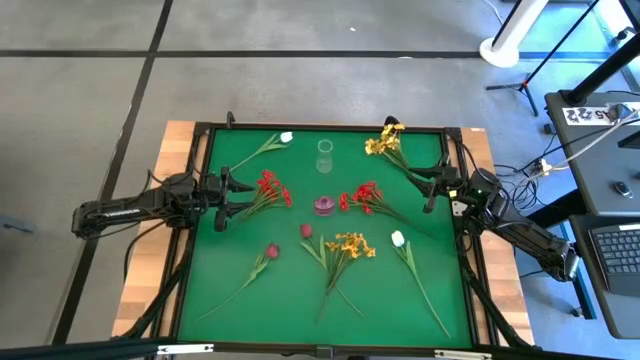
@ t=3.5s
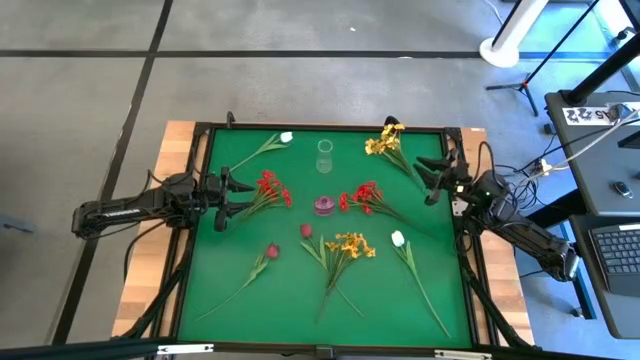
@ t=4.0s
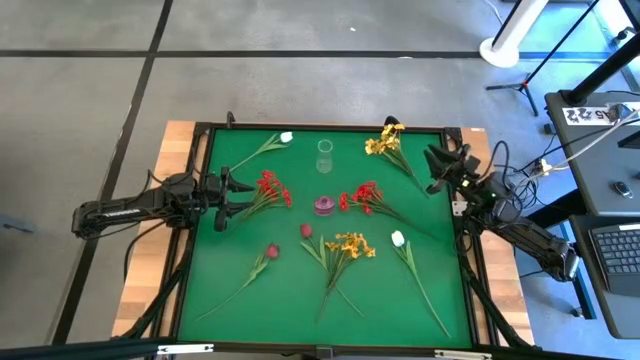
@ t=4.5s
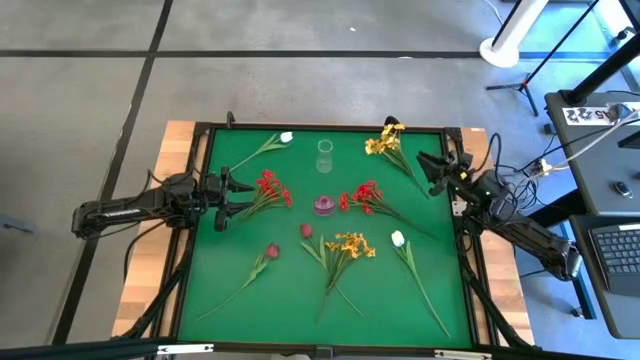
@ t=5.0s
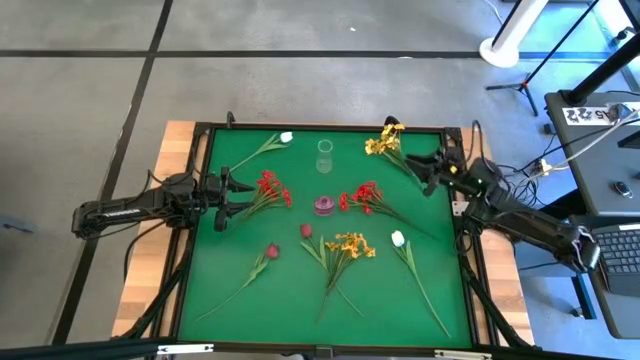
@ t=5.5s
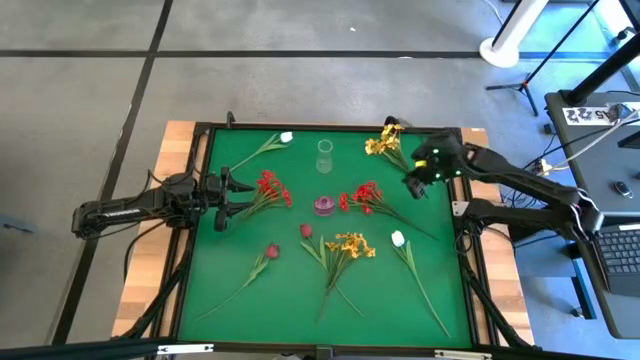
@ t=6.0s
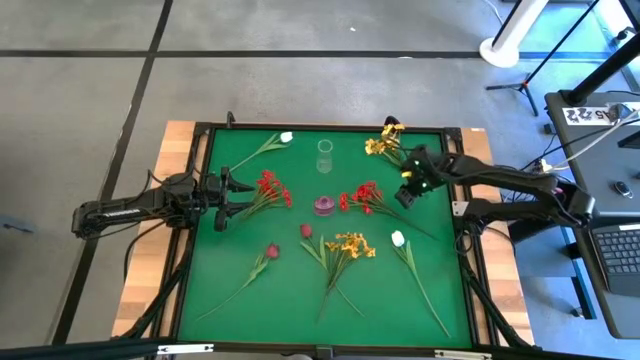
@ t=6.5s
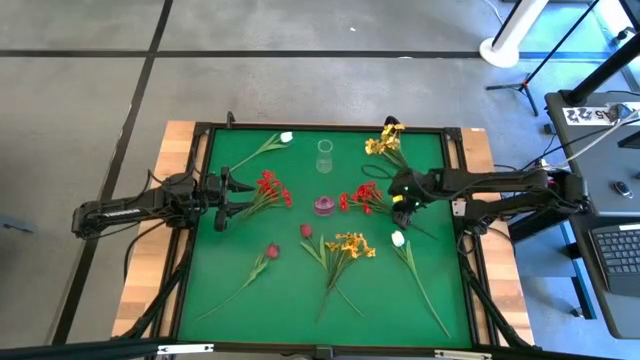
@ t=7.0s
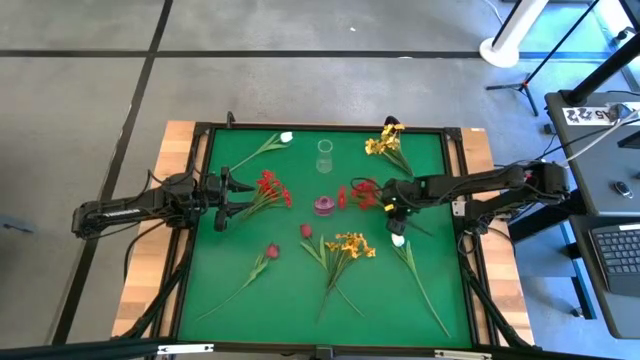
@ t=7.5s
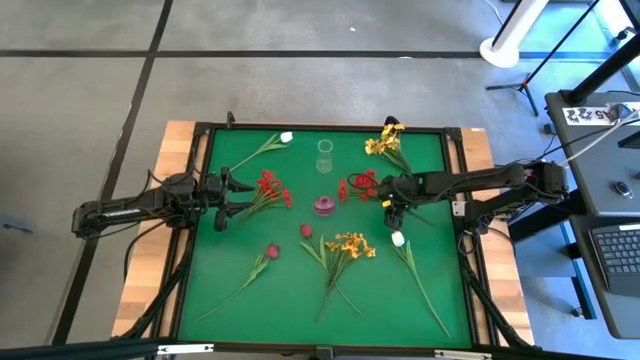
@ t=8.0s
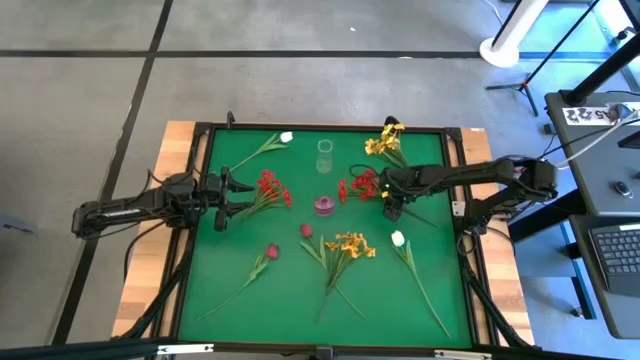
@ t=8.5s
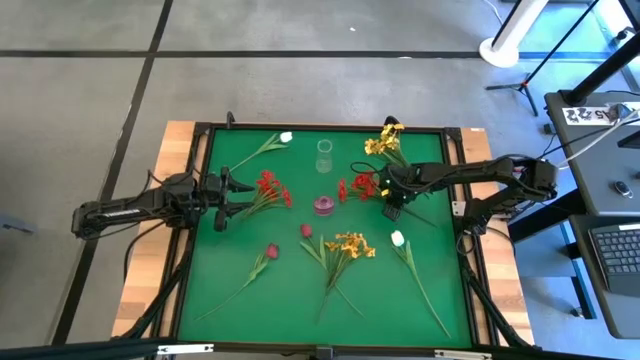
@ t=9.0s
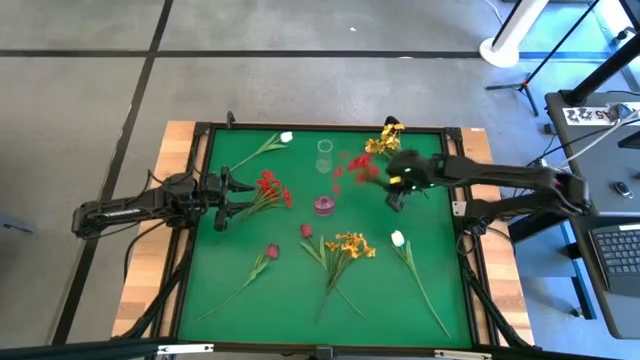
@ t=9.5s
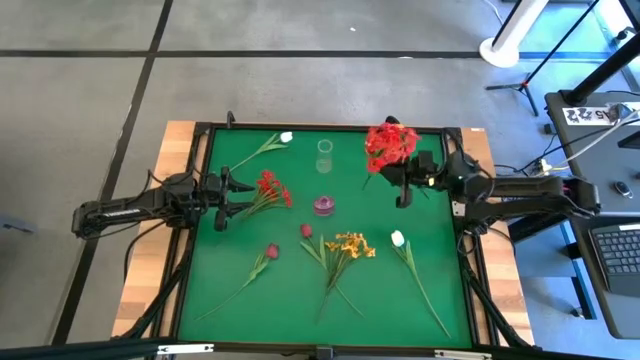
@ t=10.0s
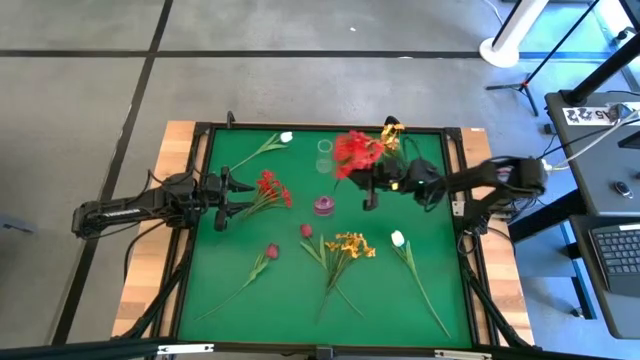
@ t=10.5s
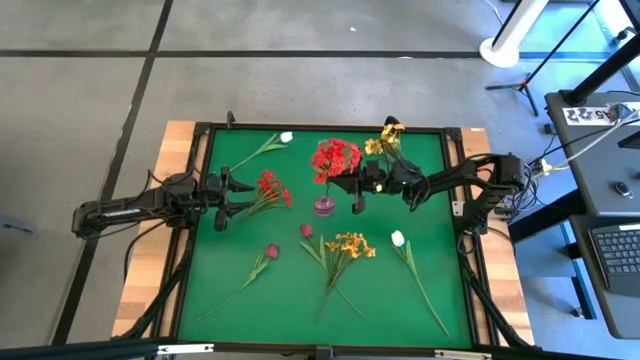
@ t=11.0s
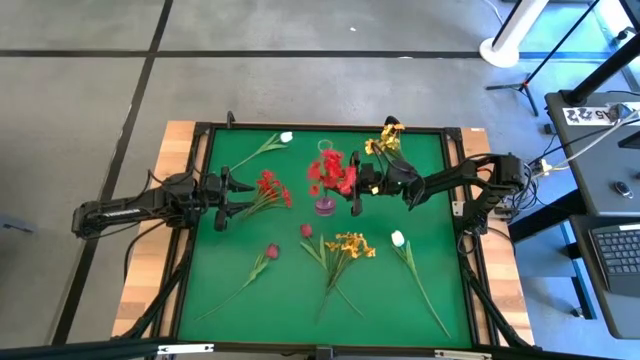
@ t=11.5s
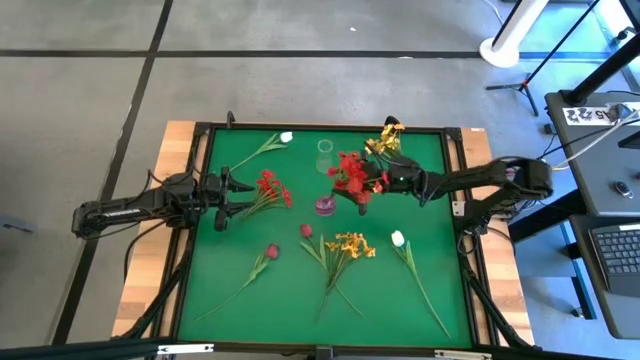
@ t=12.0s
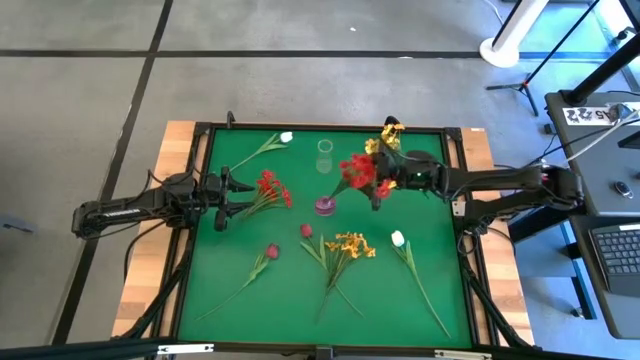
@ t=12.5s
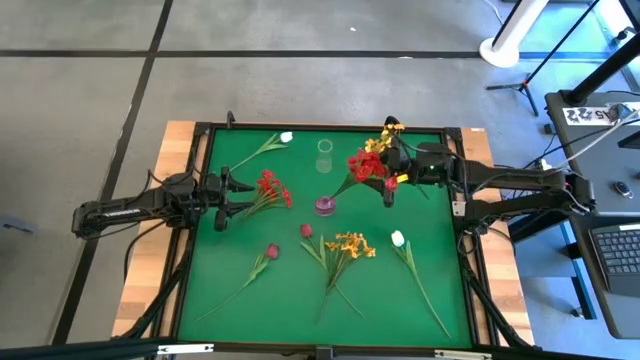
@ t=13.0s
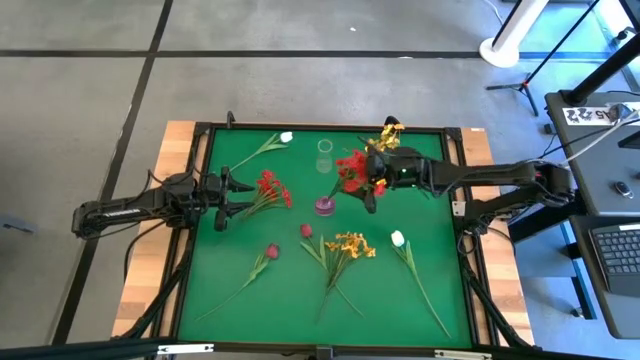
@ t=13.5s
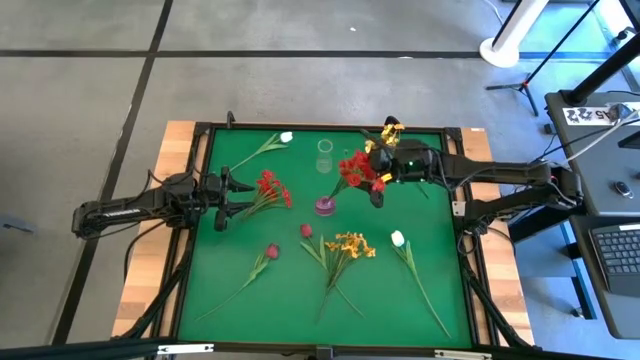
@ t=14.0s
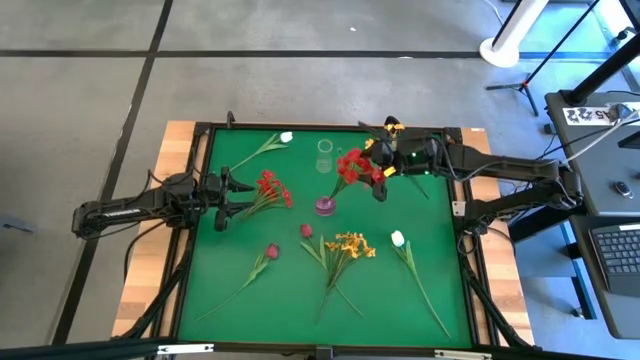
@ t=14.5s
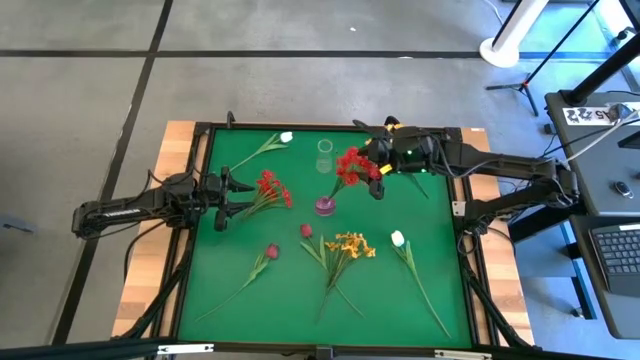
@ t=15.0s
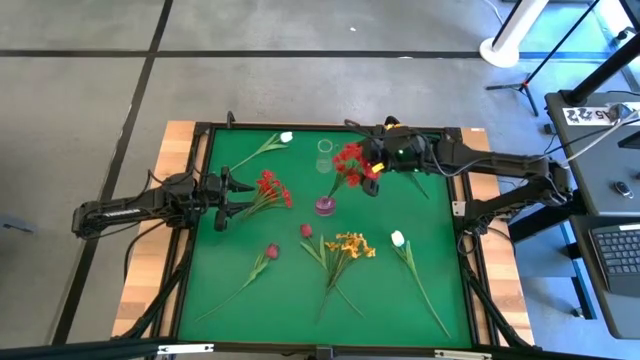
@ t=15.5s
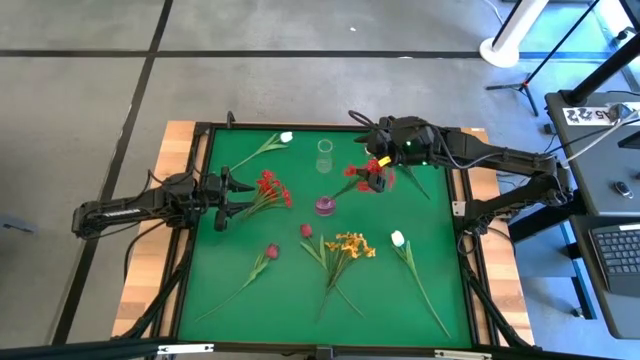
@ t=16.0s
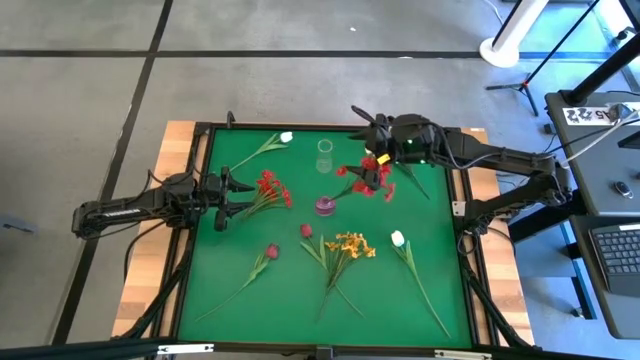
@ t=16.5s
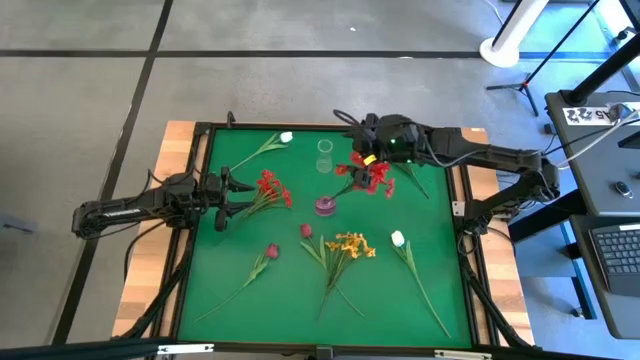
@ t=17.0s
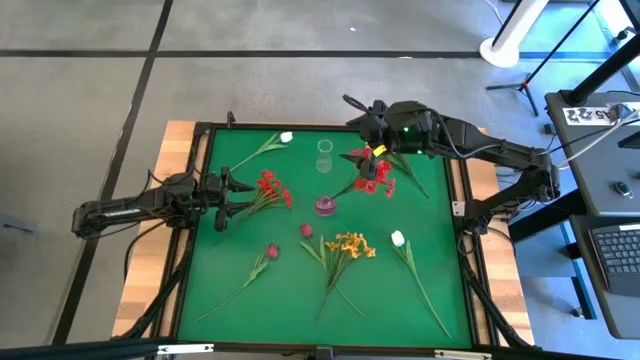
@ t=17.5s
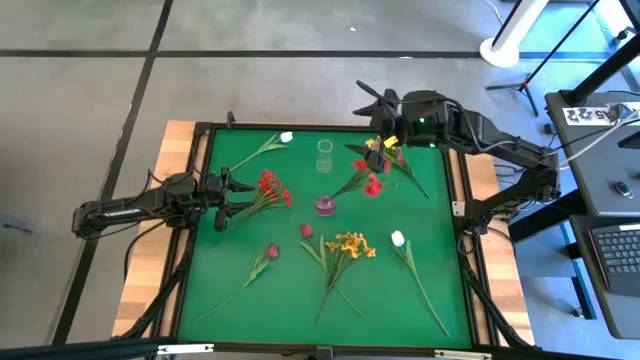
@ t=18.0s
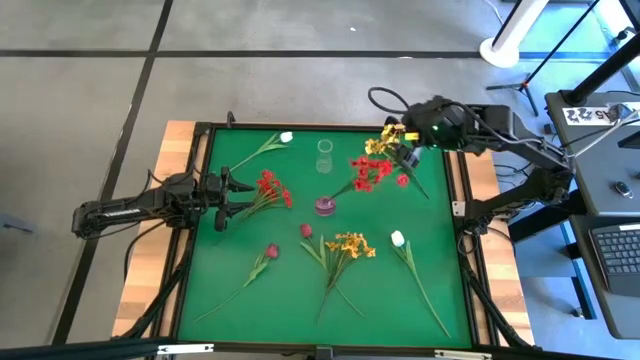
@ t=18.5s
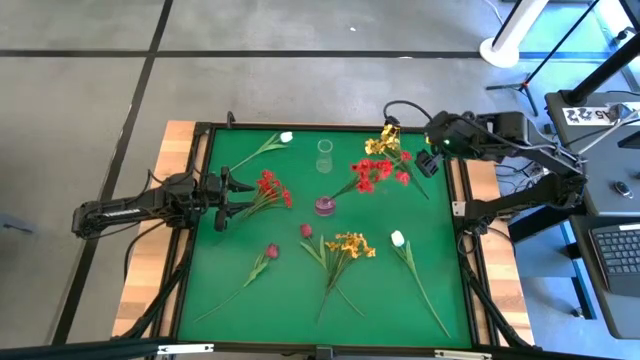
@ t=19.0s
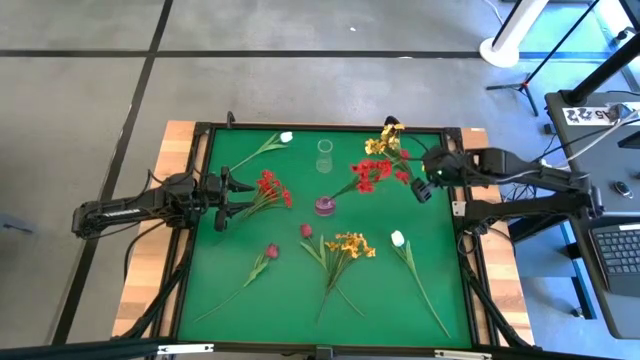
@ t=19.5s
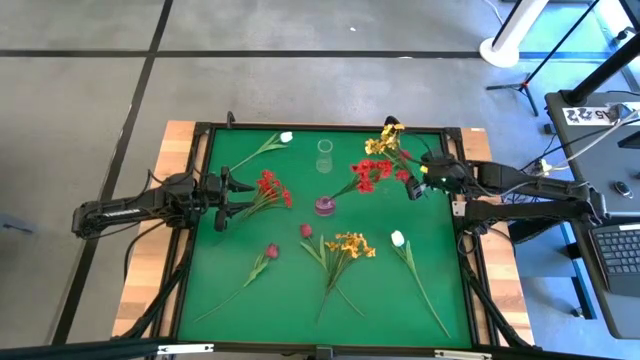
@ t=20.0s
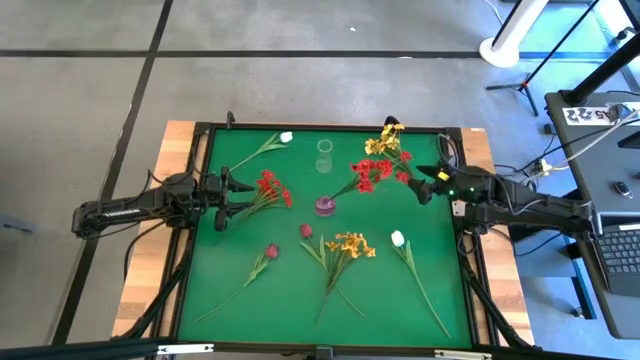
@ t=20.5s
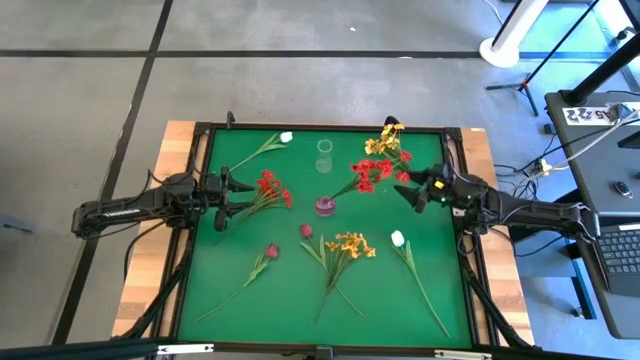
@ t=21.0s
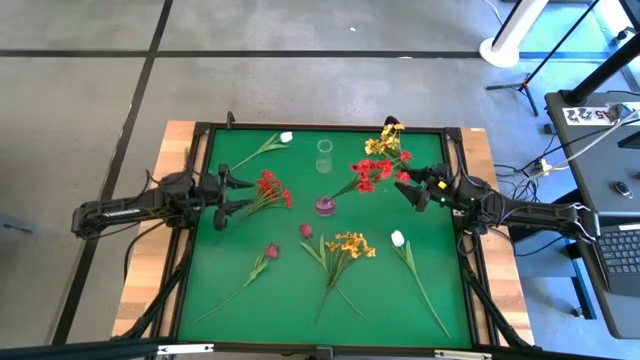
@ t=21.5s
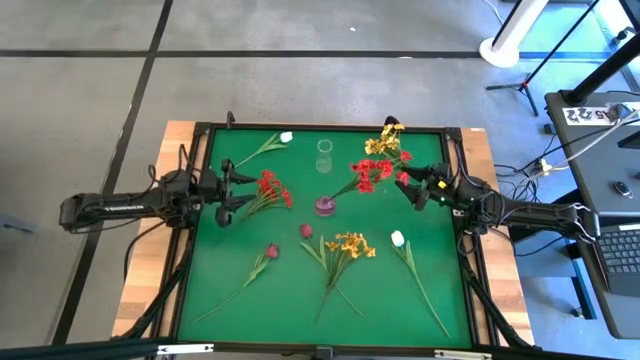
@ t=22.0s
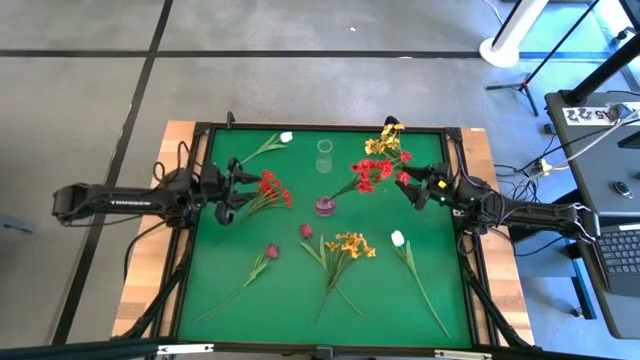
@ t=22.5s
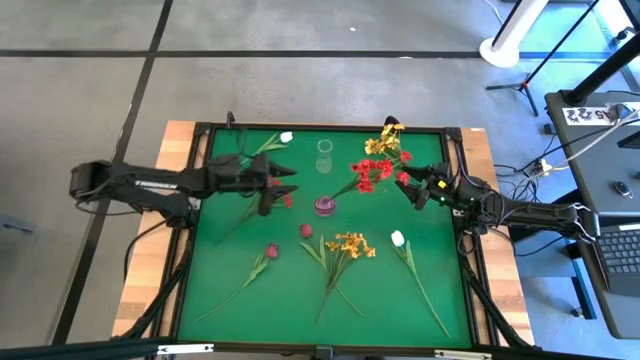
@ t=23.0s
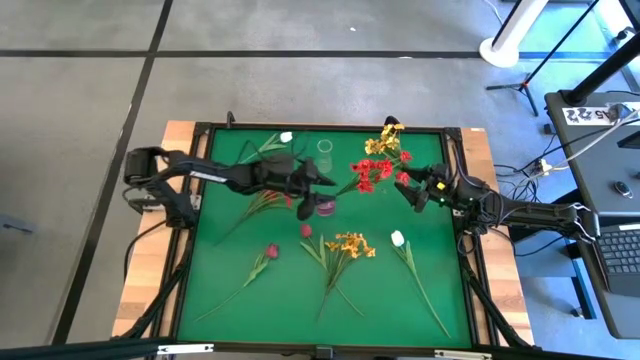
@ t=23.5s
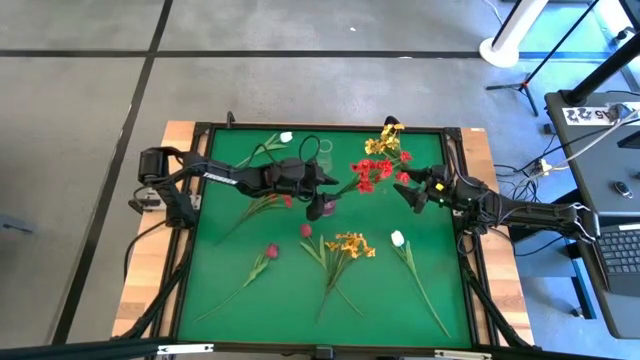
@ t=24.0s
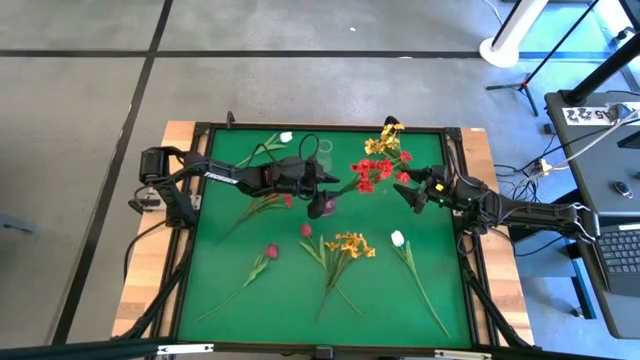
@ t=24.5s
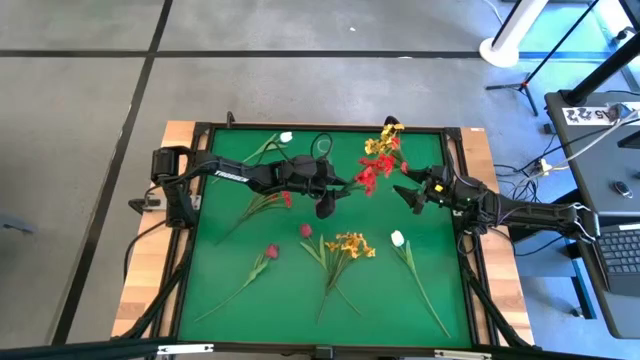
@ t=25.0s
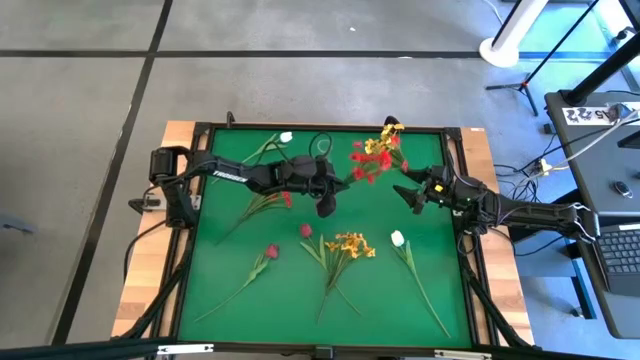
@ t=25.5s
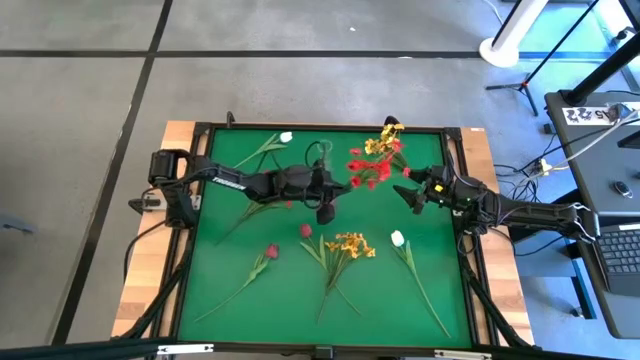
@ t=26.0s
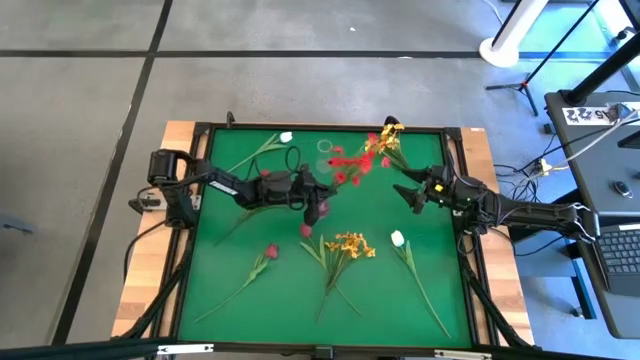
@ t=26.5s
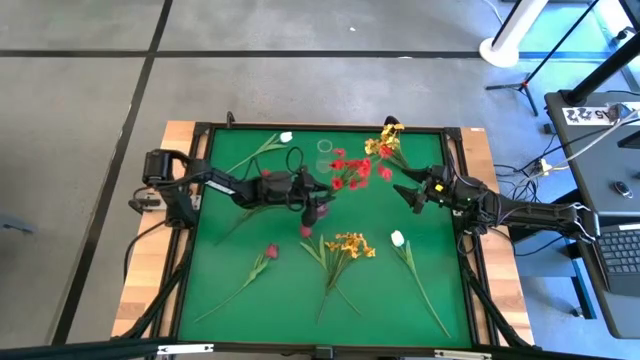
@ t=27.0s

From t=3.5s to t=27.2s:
Task: Sort flowers into vase by color
Put the right red flowers into the violet vase
